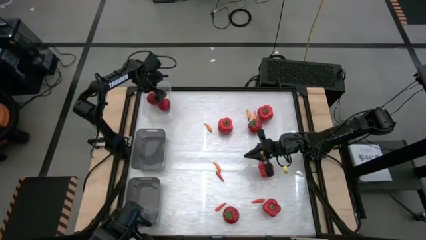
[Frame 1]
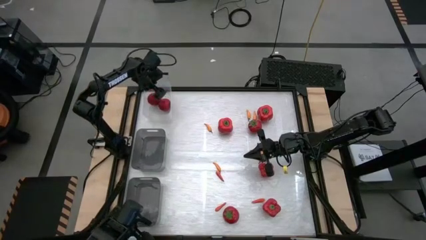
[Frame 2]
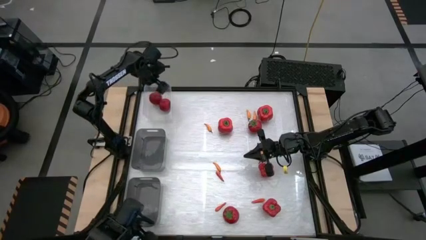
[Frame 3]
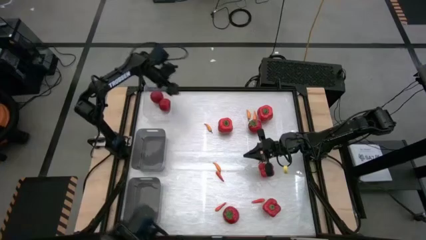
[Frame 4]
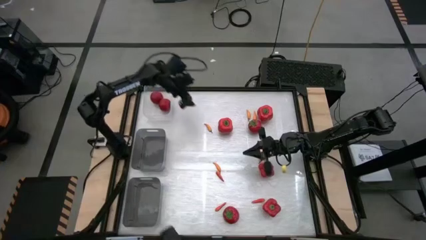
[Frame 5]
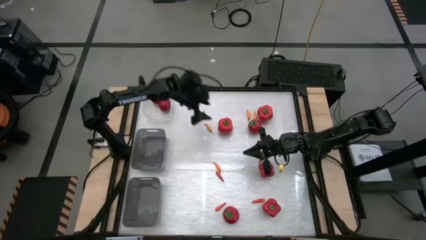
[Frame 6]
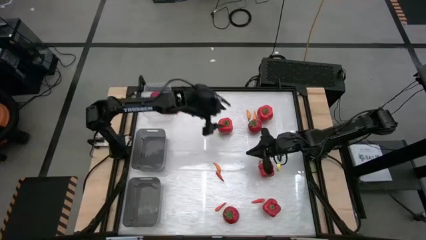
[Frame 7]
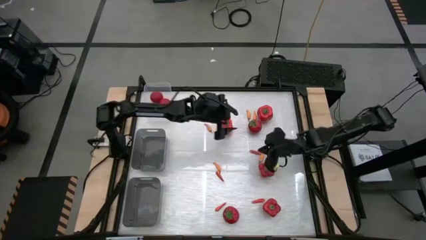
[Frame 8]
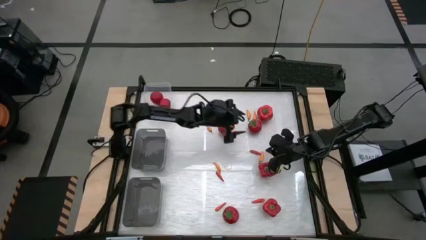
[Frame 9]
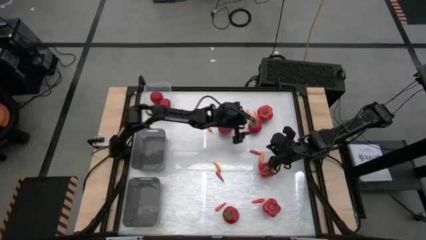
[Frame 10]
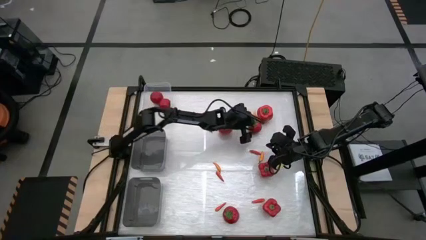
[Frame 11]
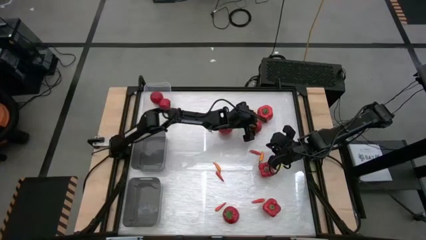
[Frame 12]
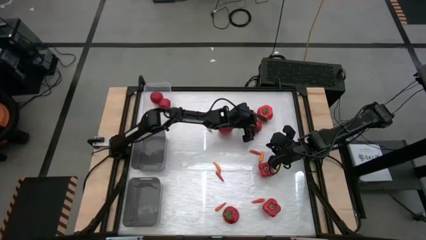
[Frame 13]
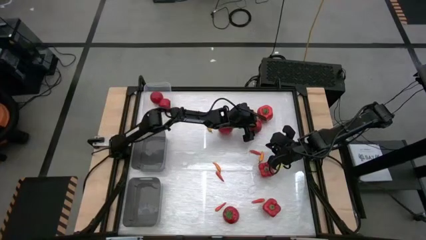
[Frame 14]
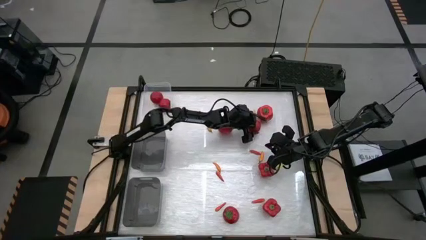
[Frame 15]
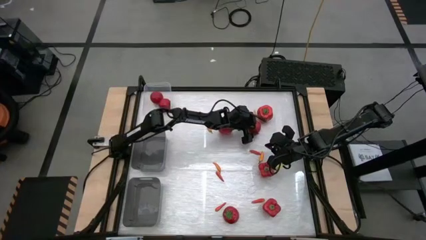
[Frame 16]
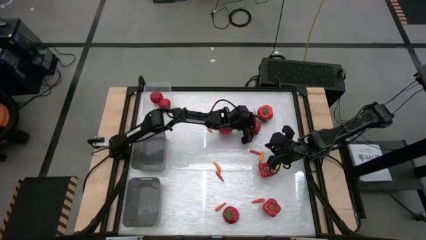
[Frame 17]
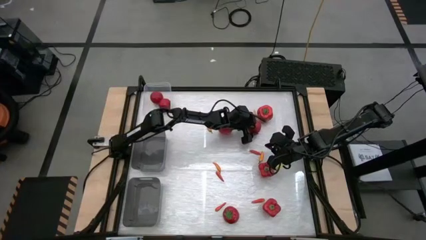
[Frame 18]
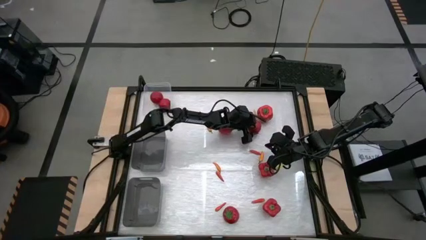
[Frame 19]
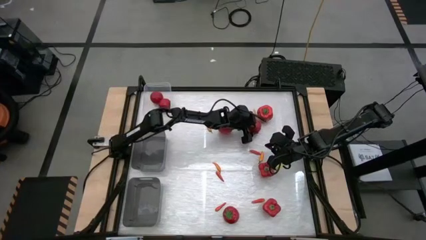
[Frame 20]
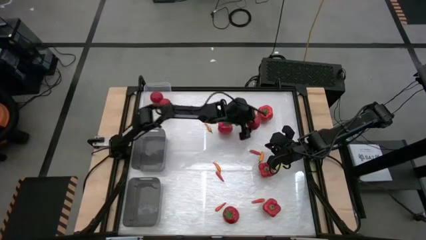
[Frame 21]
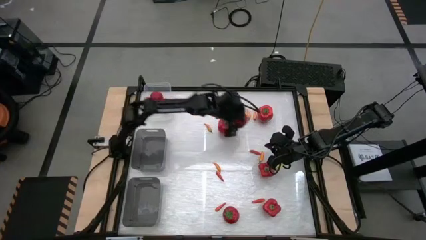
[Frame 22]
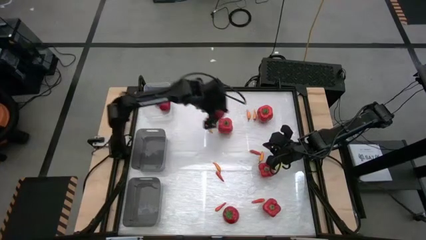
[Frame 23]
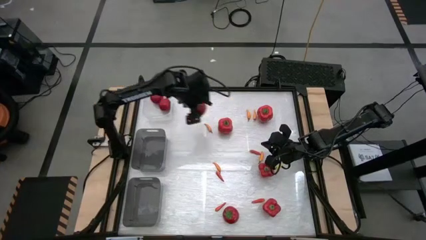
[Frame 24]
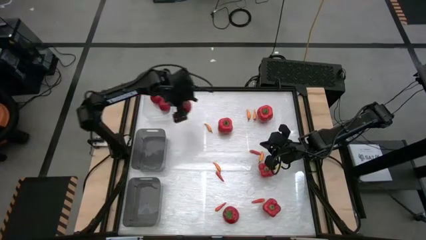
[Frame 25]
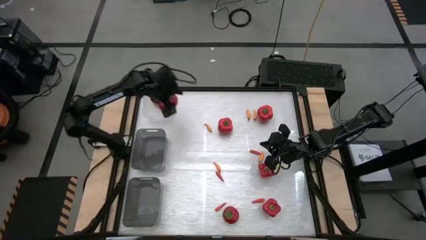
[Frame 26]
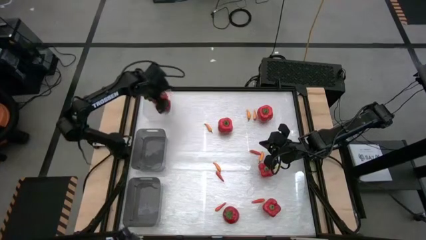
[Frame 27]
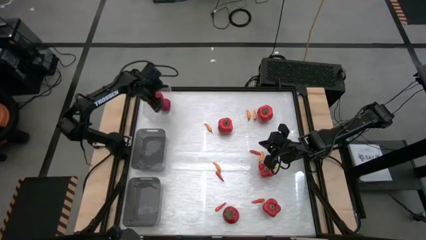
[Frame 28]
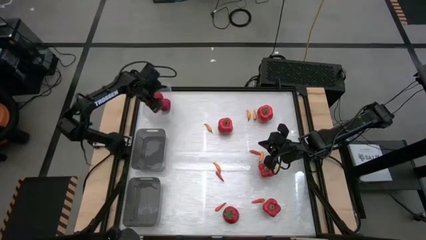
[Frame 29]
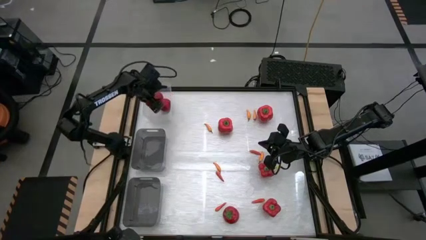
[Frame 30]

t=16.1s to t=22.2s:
Task: Sort produce into baskets
Put the tomato into the transparent bin

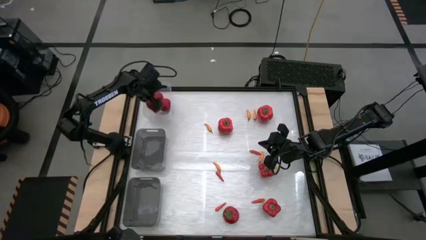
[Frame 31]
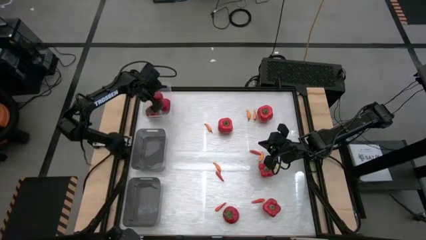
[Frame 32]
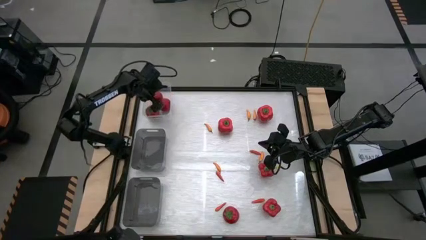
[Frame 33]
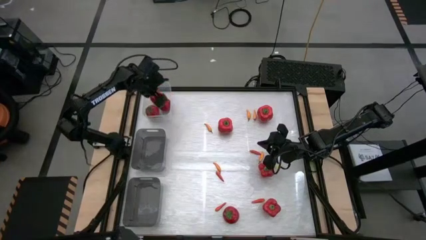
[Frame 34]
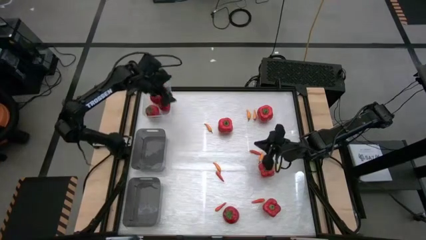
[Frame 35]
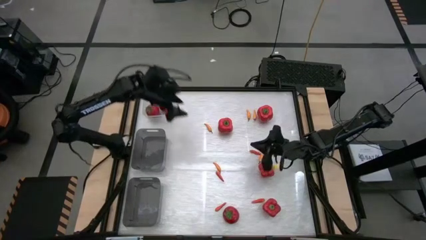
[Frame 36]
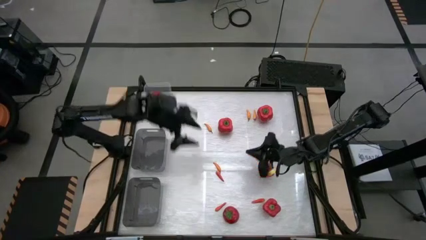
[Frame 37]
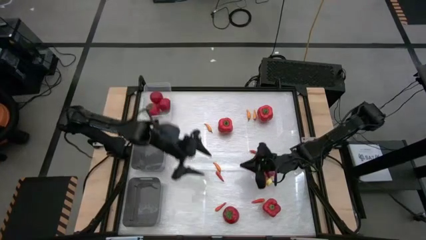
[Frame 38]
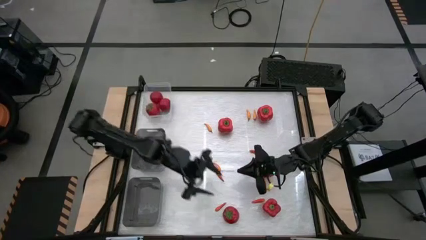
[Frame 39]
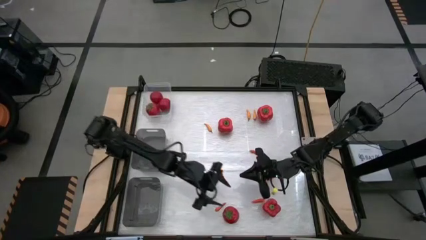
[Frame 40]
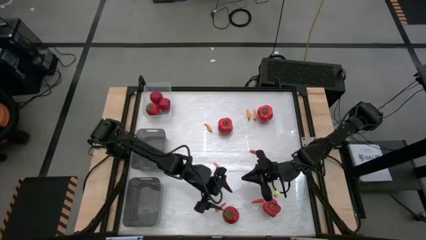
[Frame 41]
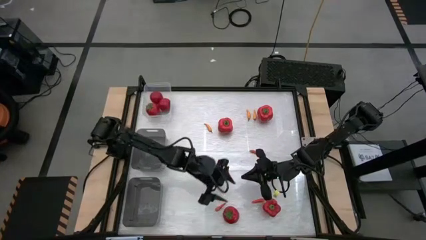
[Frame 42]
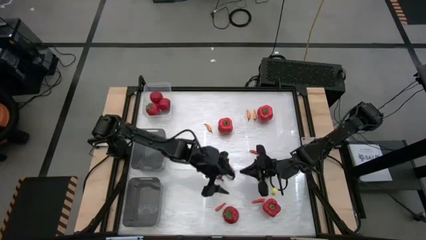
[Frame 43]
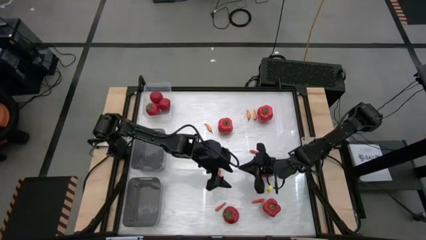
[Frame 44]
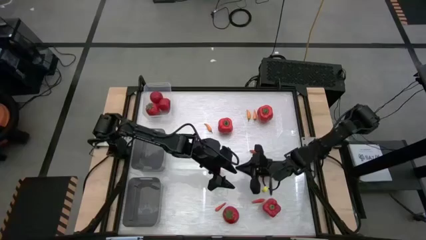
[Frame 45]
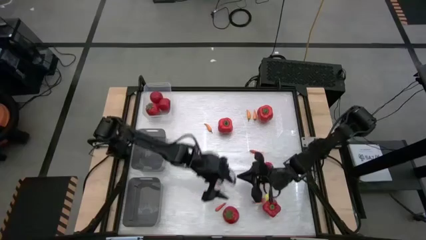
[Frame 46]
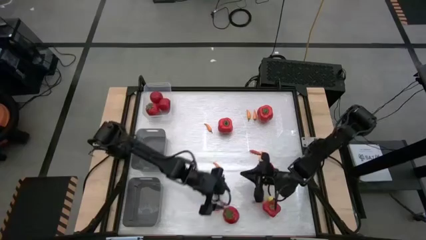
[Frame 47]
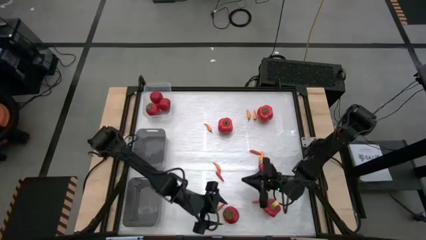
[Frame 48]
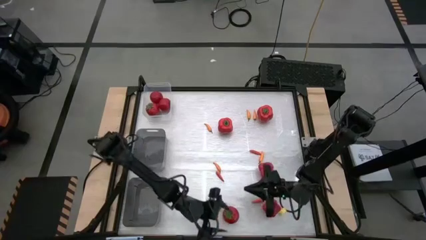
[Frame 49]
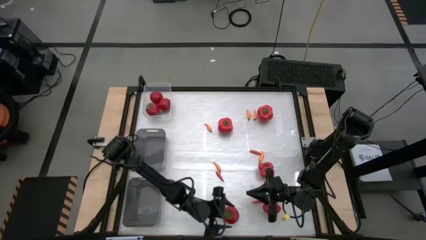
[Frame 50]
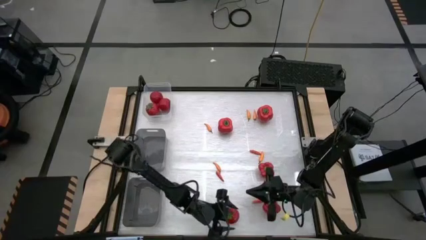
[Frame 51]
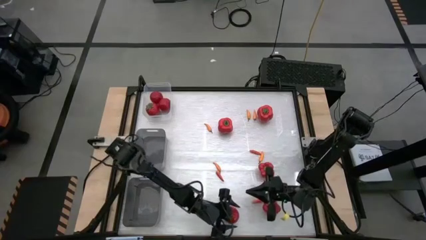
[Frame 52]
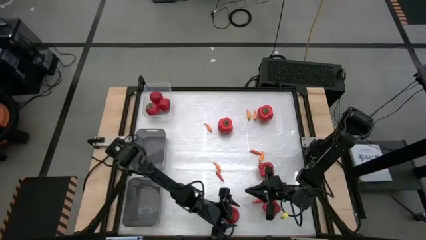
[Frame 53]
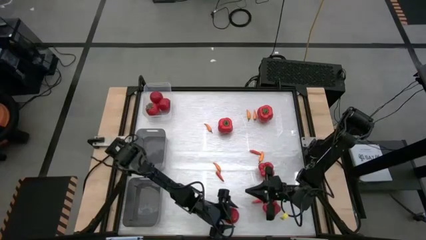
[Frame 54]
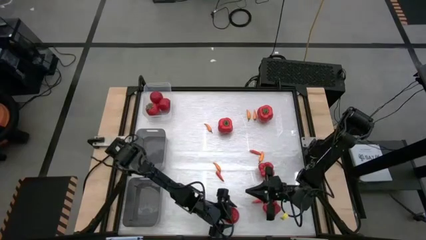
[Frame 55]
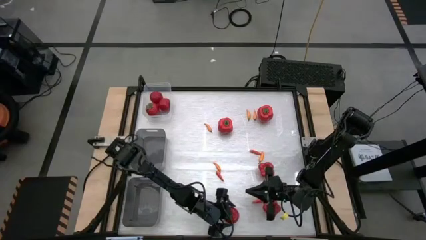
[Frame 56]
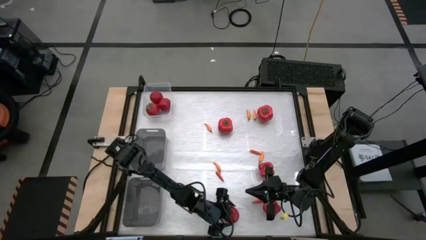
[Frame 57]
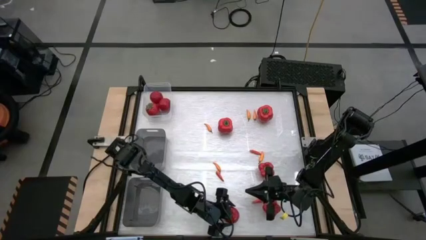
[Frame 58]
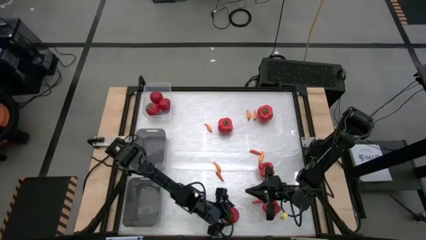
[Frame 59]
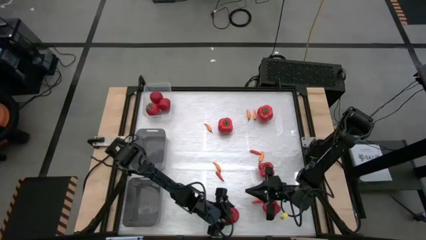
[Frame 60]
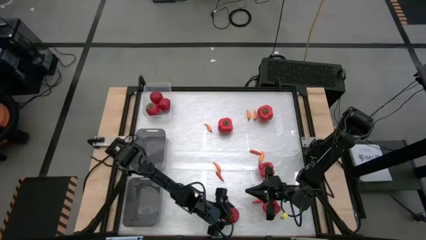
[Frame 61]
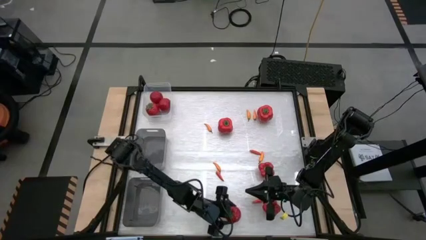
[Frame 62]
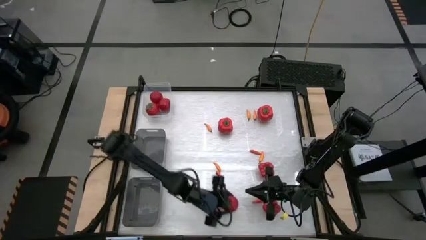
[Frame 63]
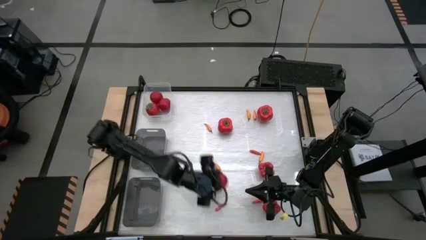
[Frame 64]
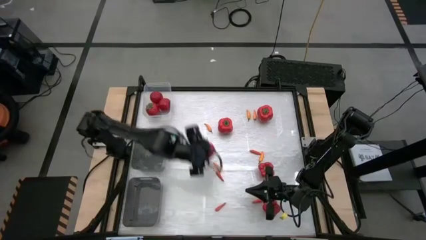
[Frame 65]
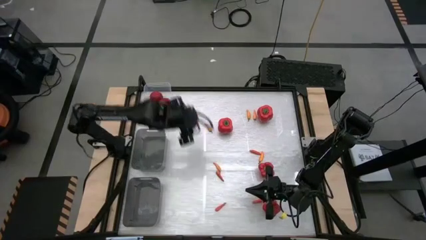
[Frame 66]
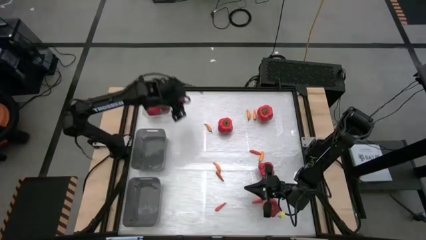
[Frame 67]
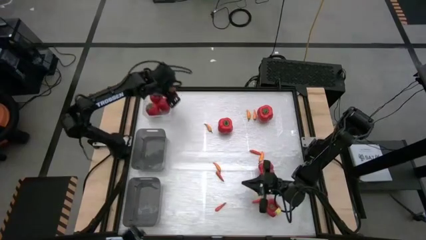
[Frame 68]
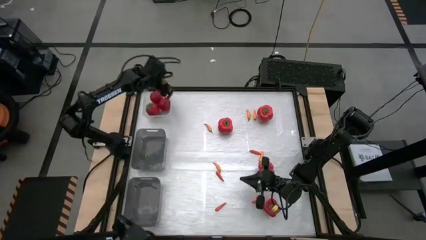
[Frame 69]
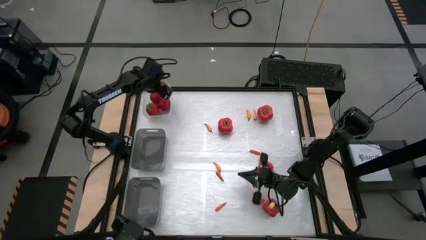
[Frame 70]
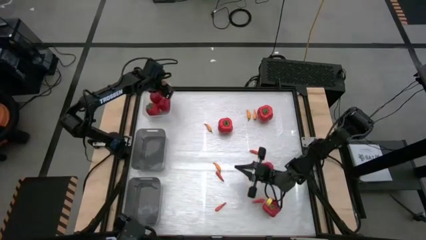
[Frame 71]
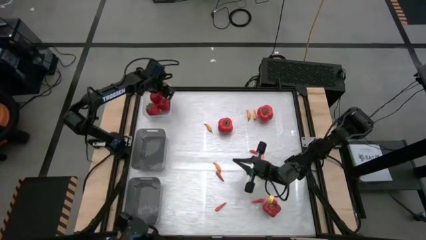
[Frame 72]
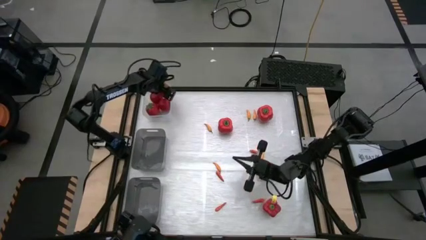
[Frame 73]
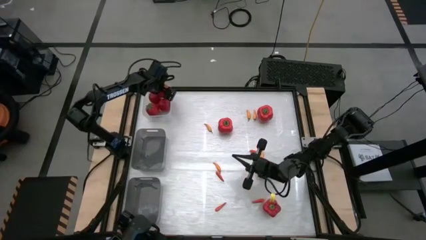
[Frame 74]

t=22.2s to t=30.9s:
Put the tomato into the transparent bin
